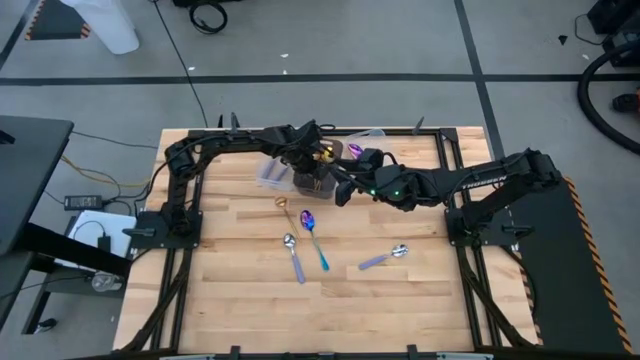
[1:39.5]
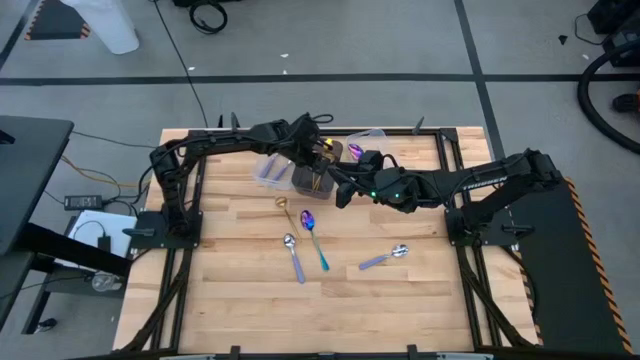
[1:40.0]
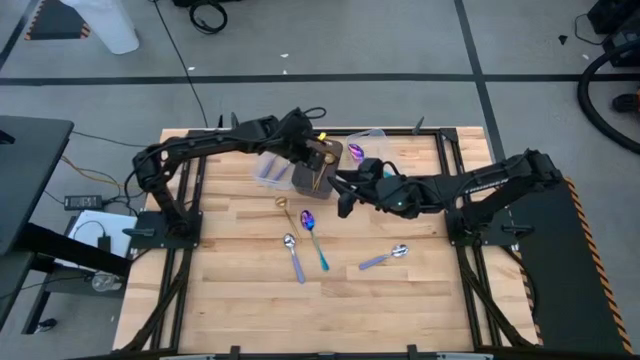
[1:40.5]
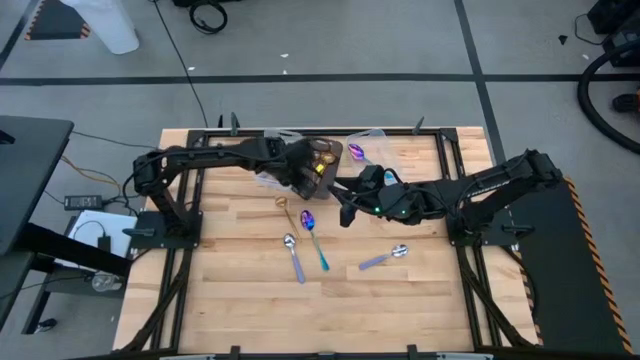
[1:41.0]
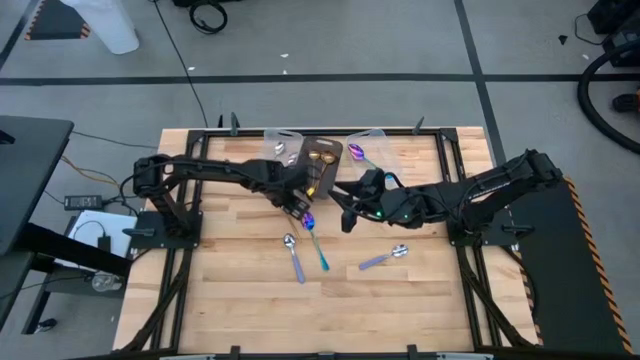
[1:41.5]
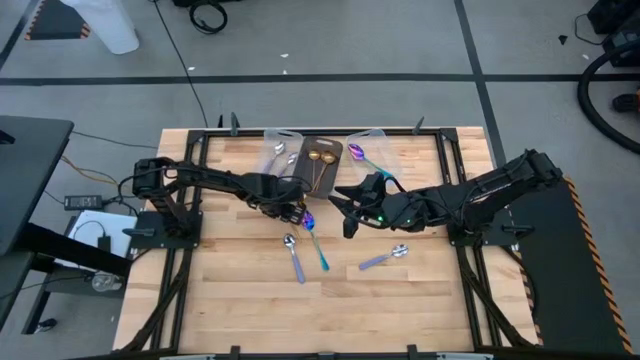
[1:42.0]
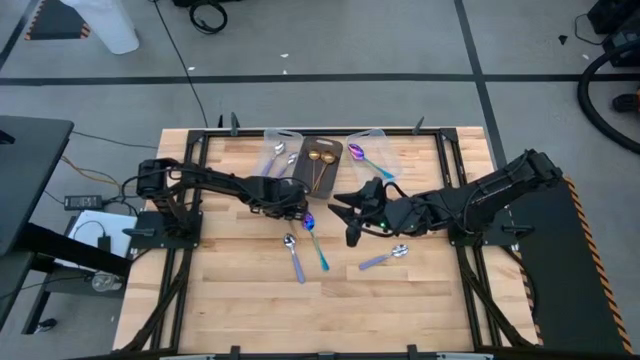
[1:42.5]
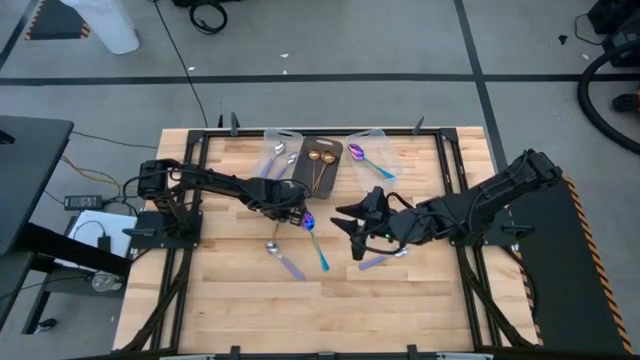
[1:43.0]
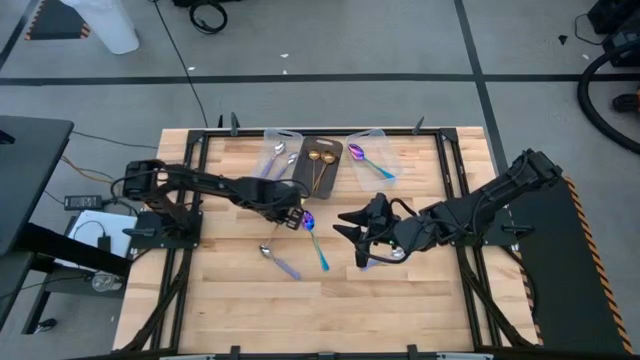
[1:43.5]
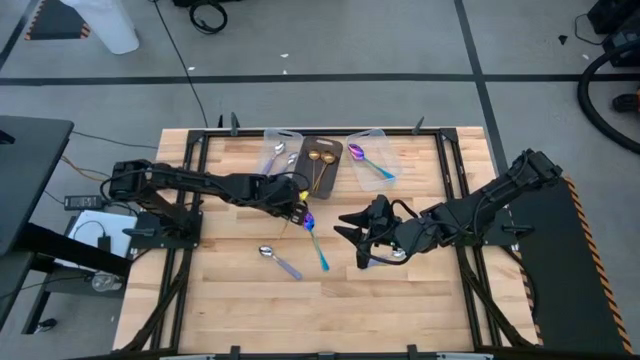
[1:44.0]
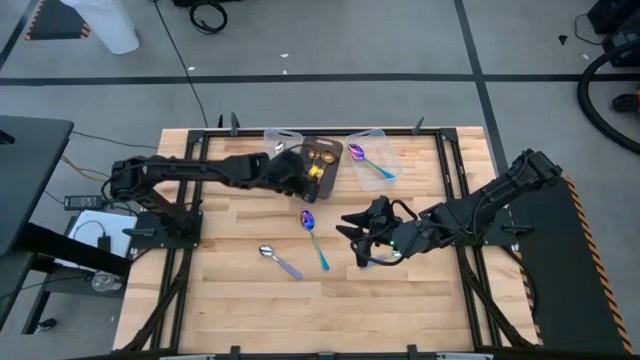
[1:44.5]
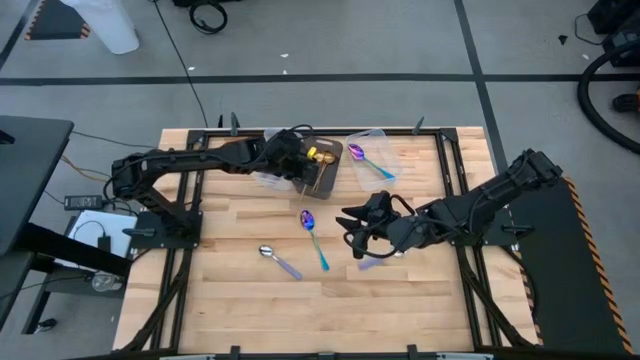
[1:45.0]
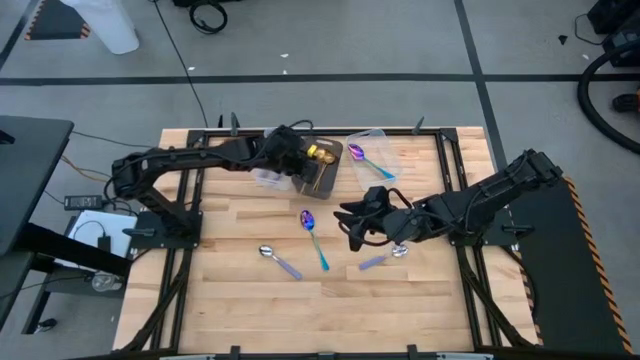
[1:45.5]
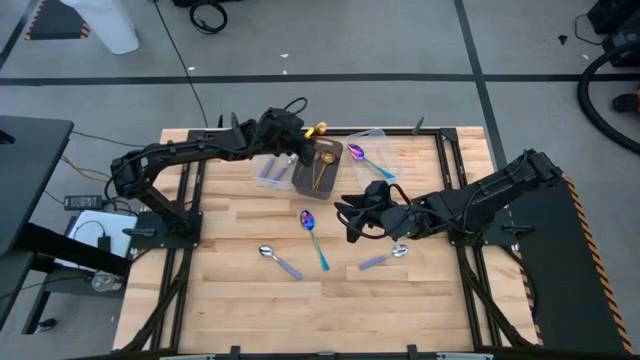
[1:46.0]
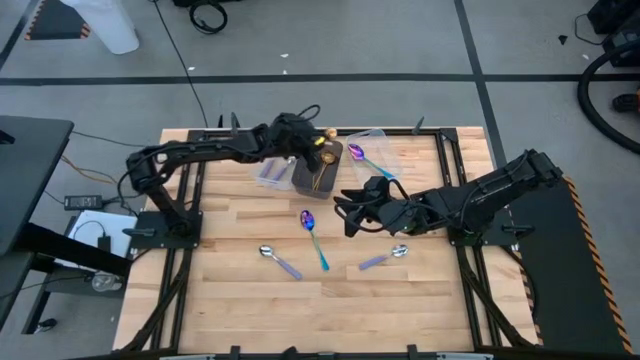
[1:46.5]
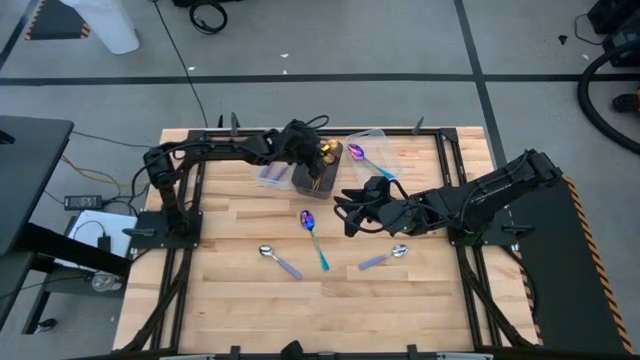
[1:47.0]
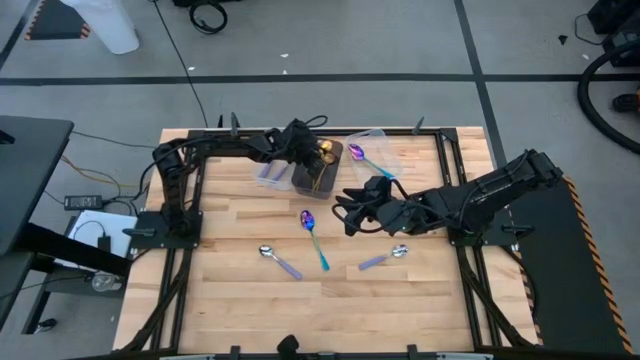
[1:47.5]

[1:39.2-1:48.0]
Task: Sort silverware by color (type)
Put the gold spoon into the black bin

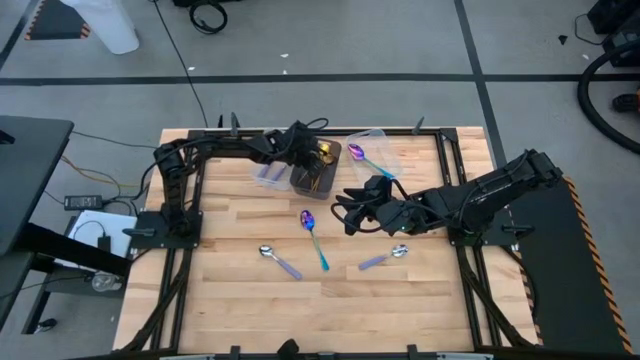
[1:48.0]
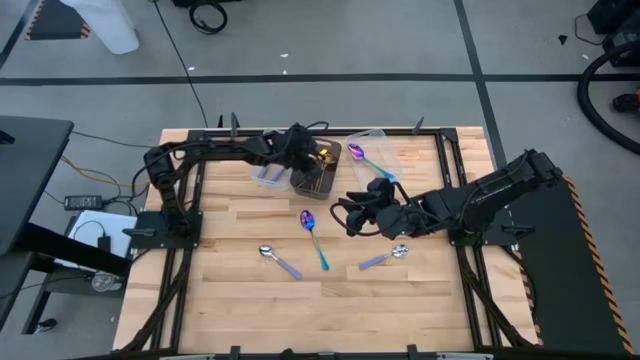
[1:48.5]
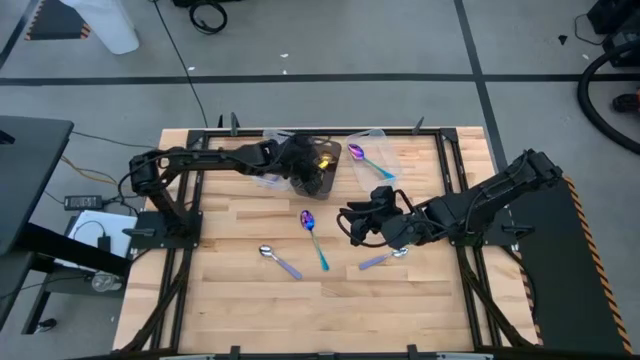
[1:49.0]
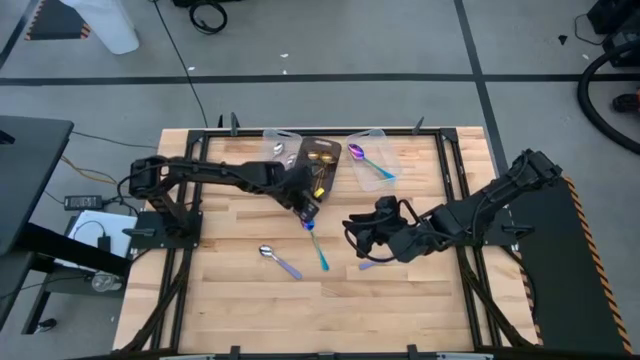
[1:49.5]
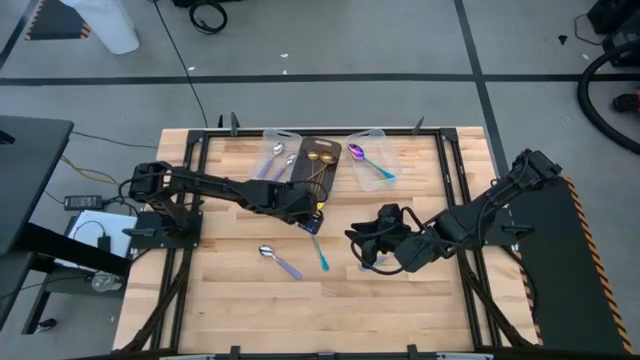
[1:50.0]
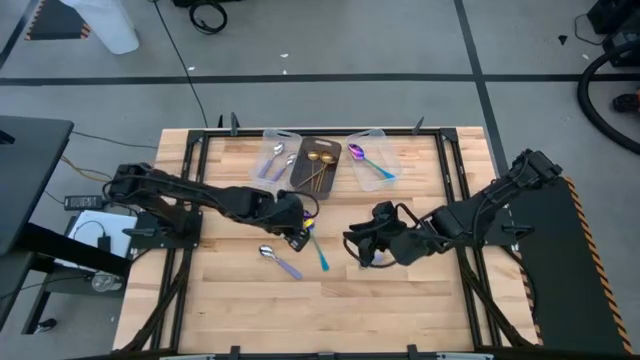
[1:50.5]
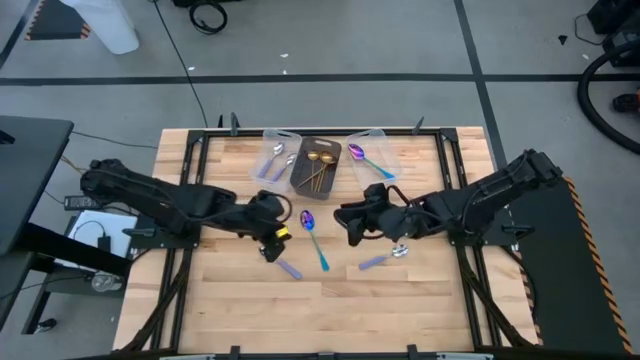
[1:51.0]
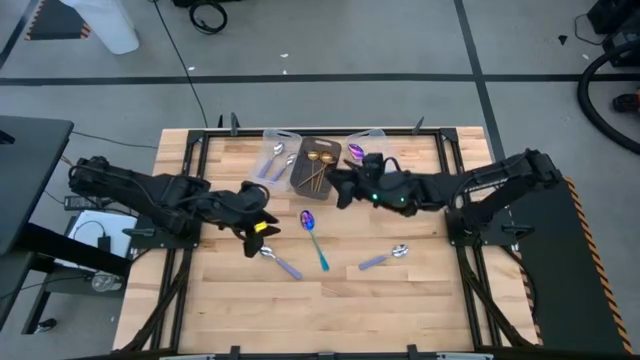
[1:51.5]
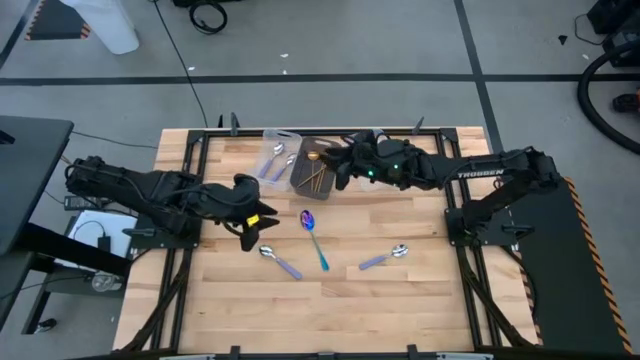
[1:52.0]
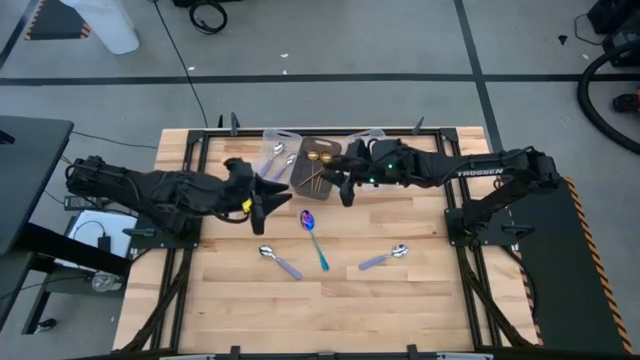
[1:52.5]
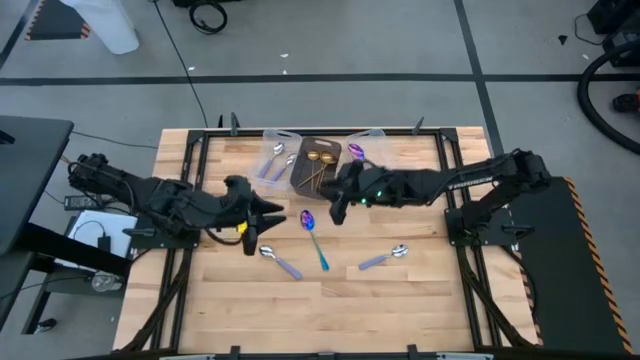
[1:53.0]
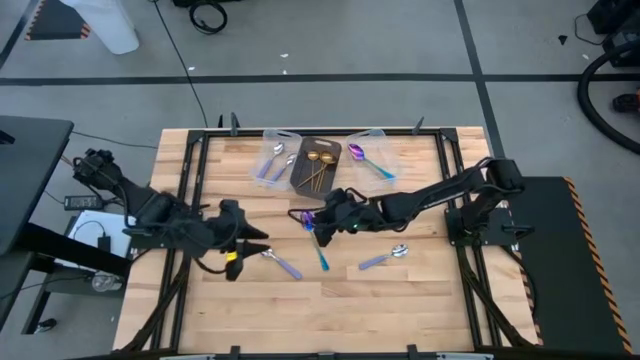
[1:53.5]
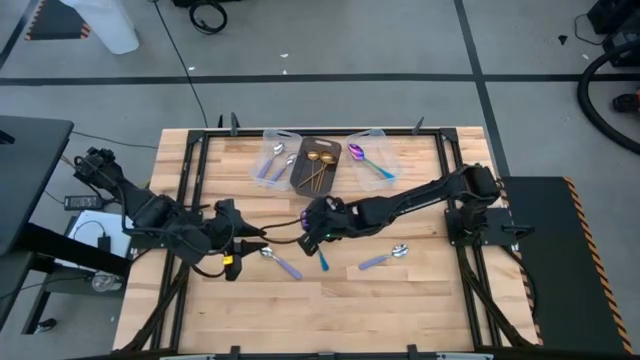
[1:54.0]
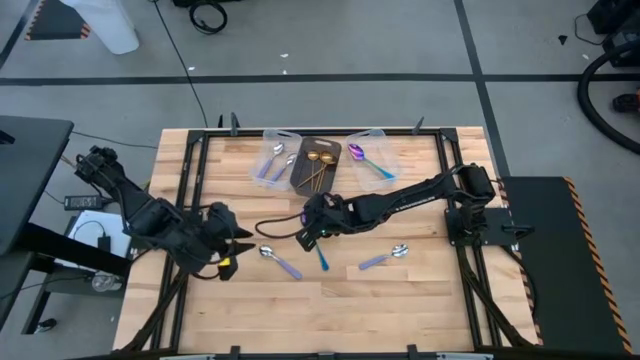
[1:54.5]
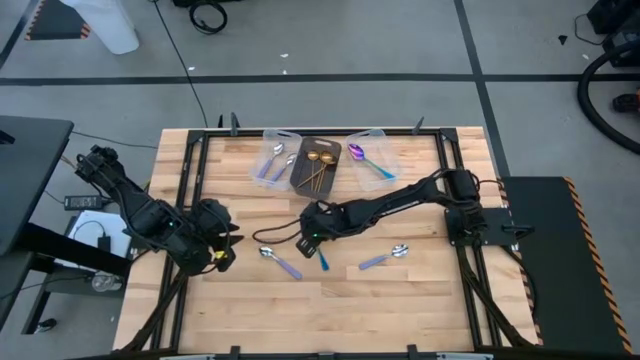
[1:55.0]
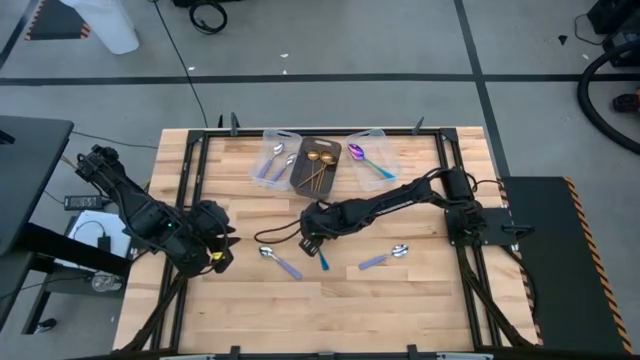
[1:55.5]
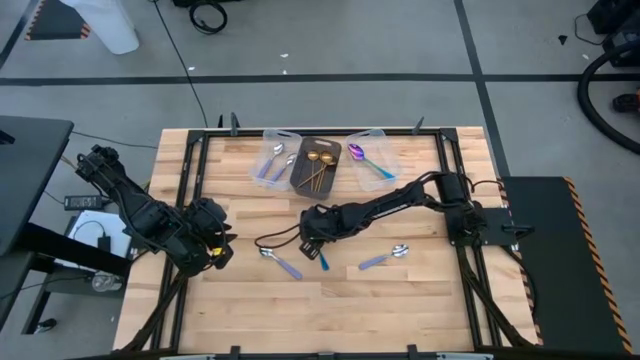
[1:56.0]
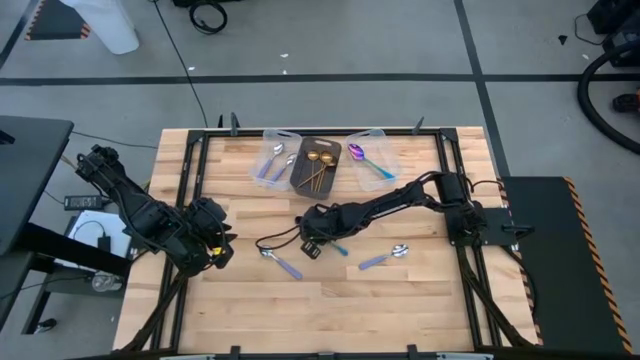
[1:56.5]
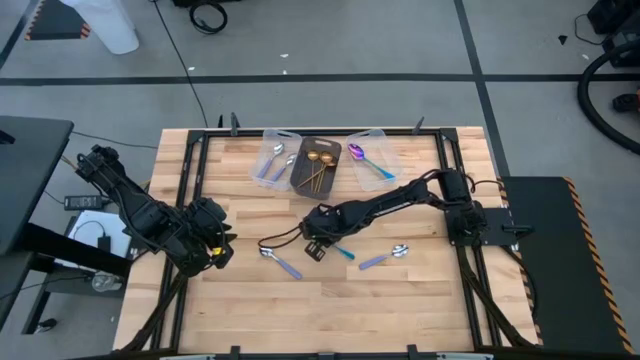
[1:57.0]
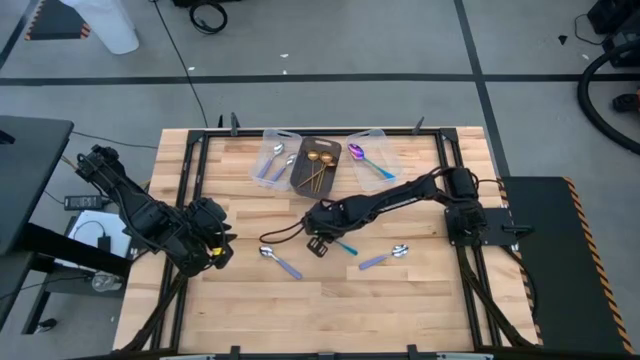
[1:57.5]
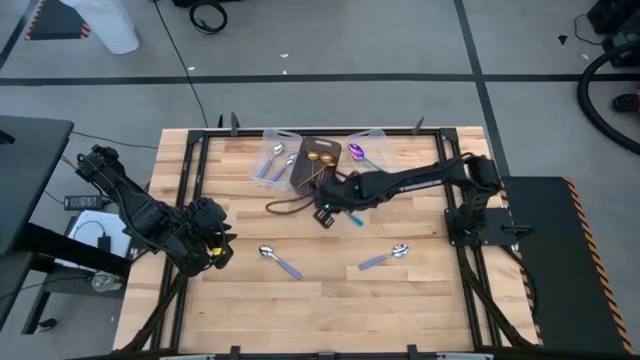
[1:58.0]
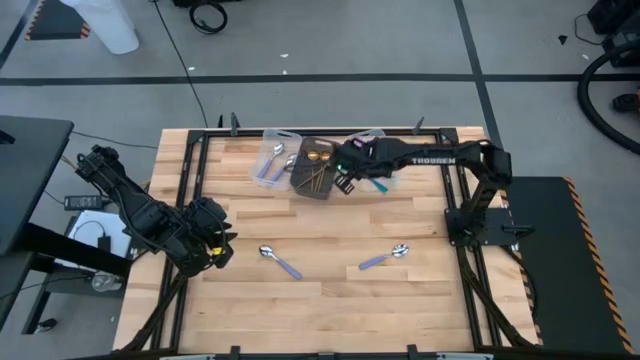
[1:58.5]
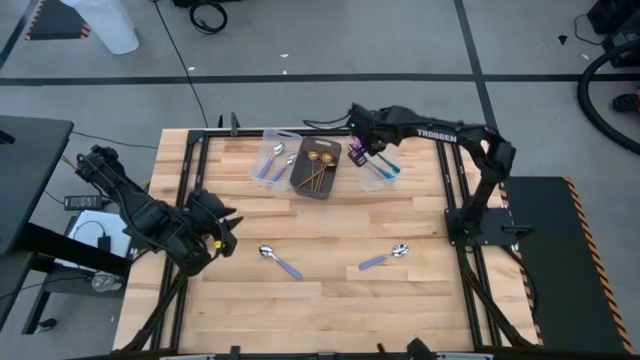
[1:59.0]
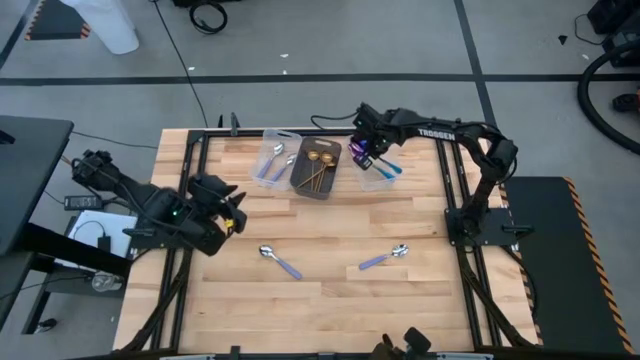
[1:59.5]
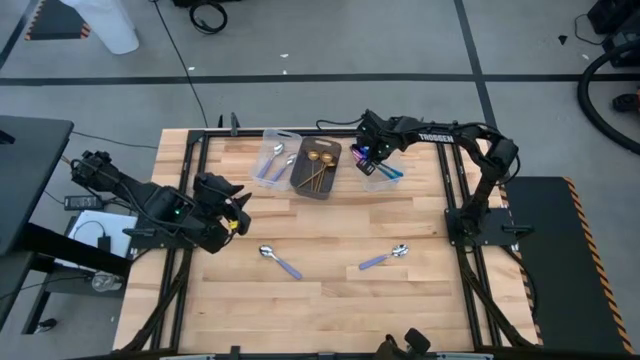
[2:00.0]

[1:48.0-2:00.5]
Put the blue spoon into the right transparent bin

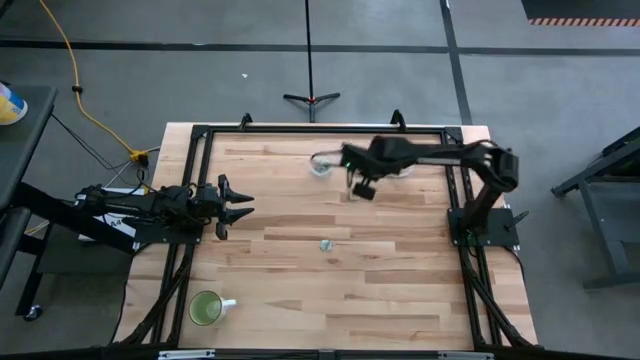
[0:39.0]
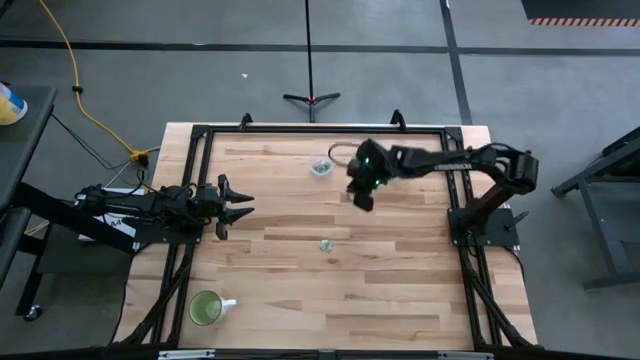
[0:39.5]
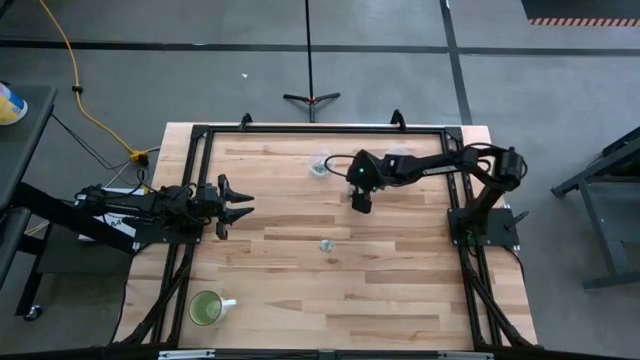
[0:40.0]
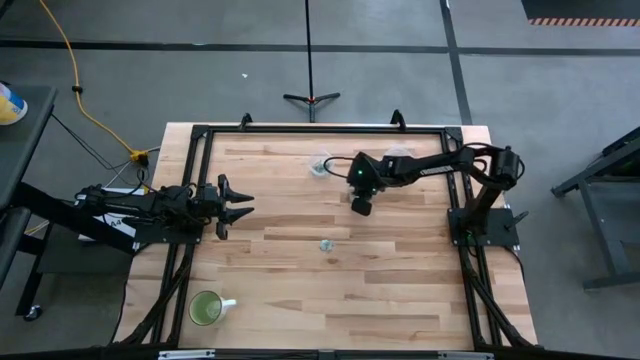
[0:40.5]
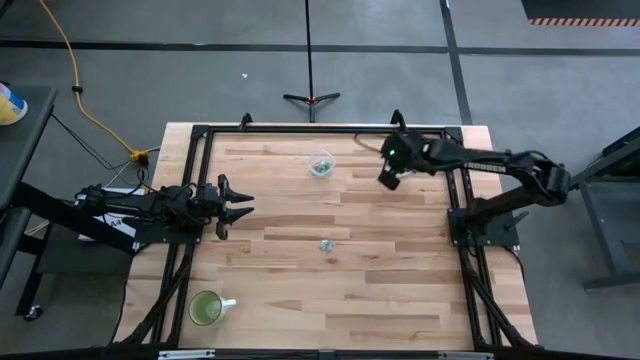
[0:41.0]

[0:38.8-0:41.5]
Task: Pick and place Stevia / Truvia into bins
Put the stevia packet into the left transparent container
